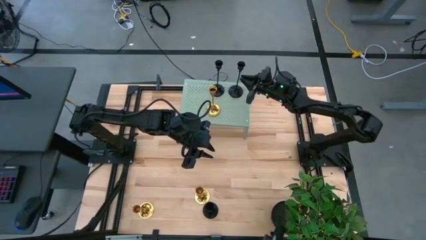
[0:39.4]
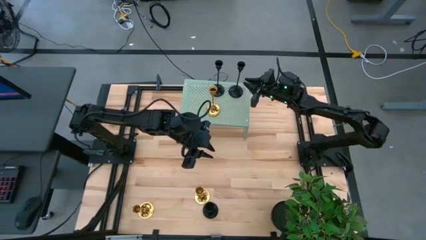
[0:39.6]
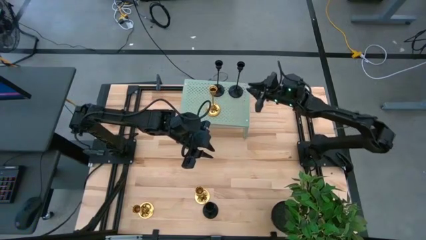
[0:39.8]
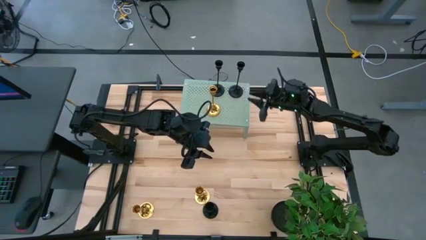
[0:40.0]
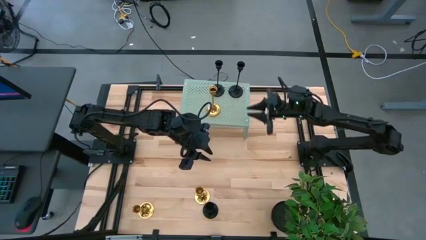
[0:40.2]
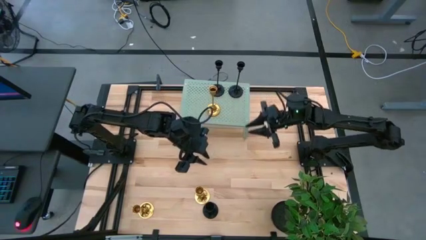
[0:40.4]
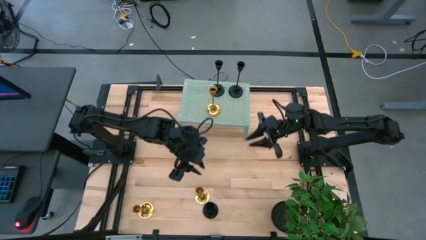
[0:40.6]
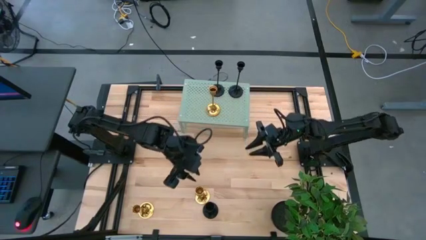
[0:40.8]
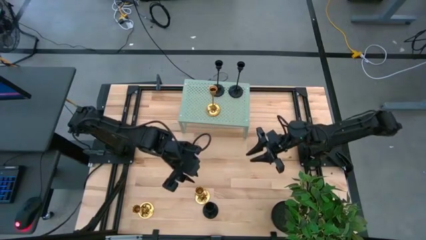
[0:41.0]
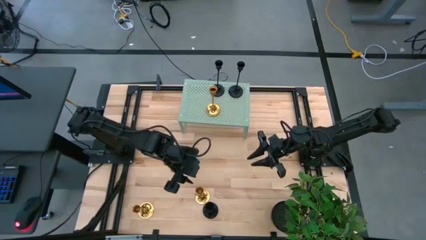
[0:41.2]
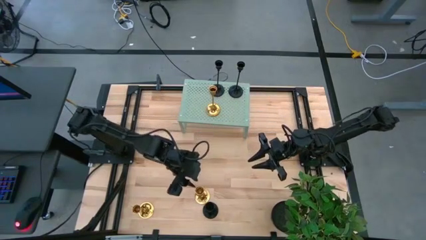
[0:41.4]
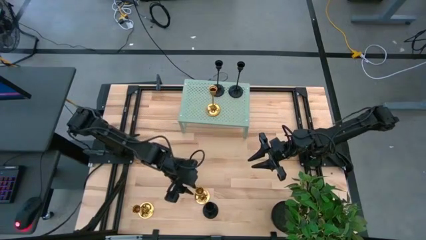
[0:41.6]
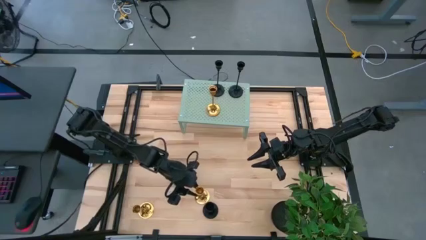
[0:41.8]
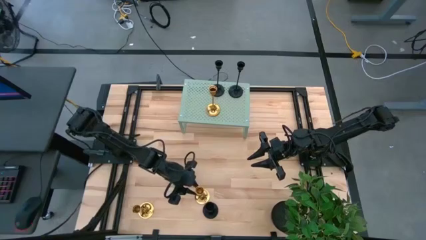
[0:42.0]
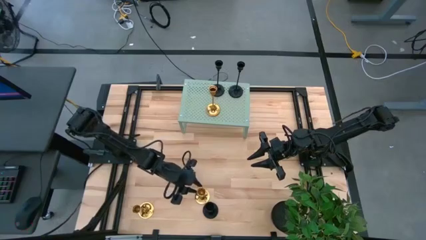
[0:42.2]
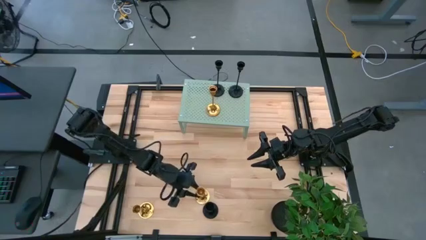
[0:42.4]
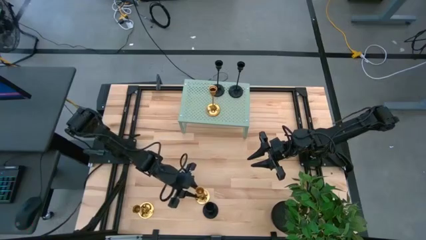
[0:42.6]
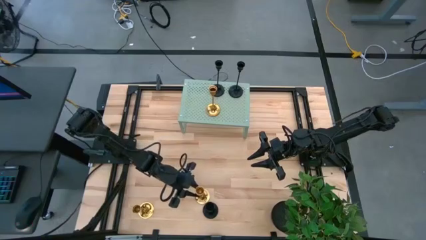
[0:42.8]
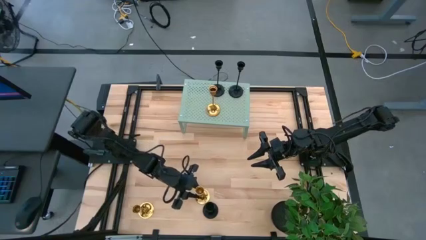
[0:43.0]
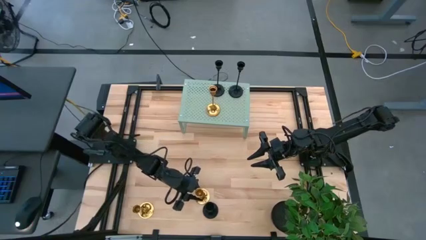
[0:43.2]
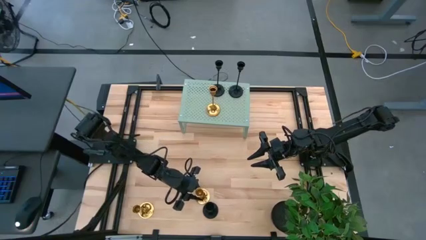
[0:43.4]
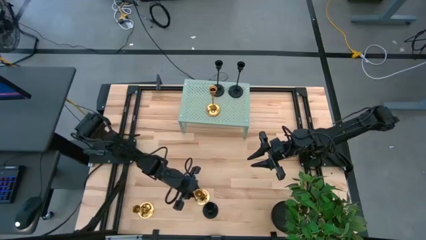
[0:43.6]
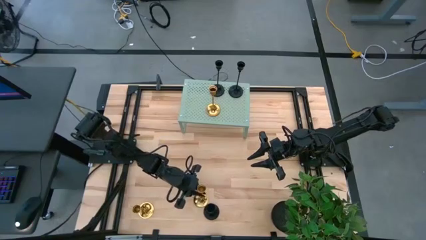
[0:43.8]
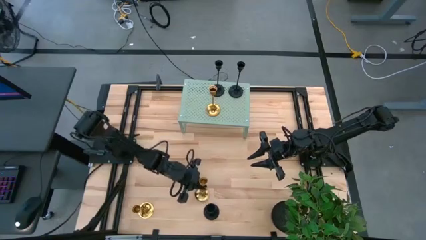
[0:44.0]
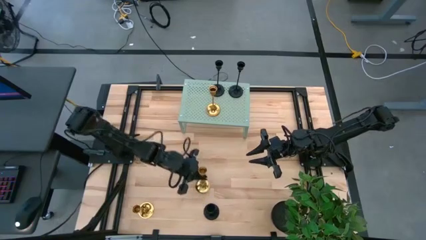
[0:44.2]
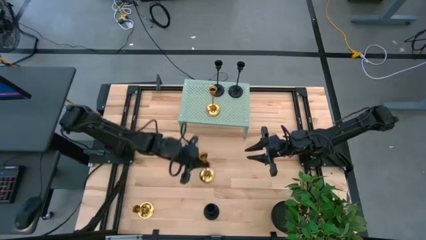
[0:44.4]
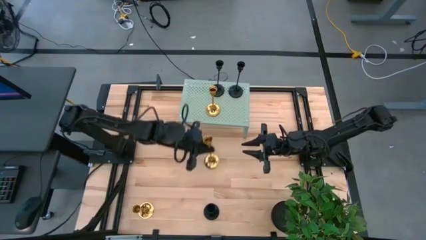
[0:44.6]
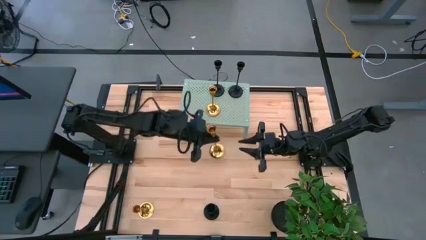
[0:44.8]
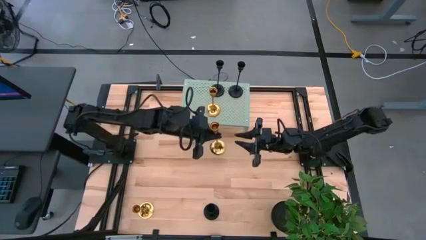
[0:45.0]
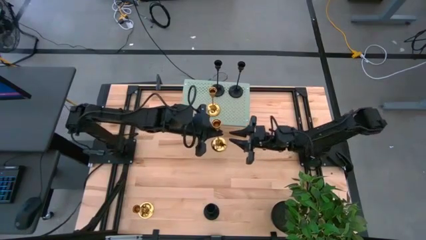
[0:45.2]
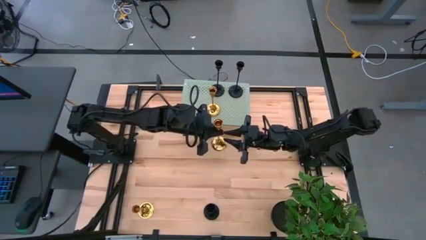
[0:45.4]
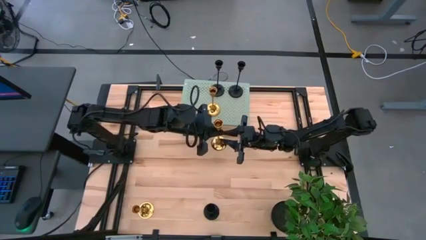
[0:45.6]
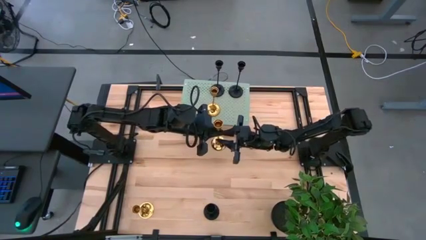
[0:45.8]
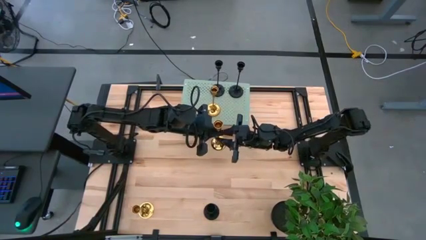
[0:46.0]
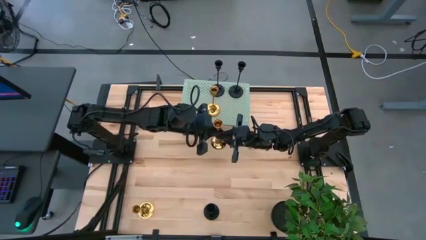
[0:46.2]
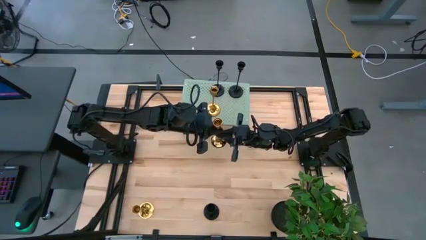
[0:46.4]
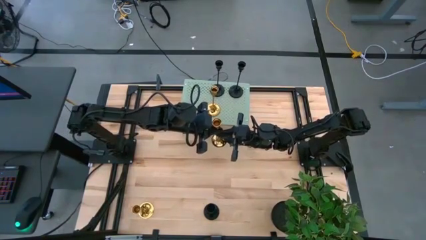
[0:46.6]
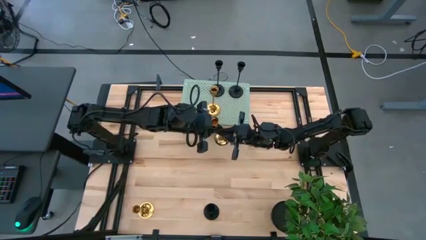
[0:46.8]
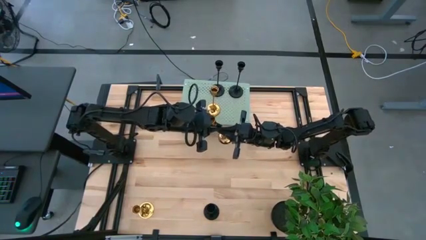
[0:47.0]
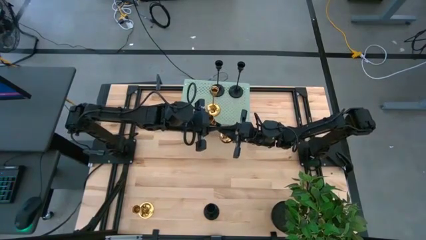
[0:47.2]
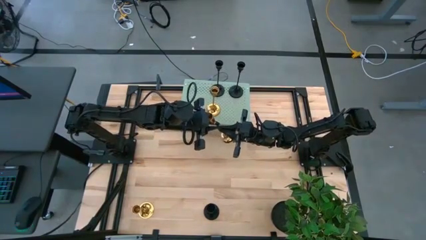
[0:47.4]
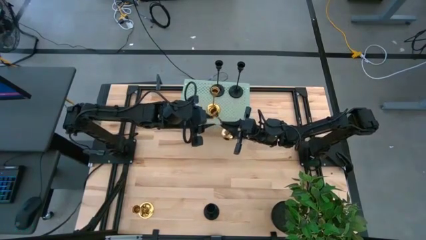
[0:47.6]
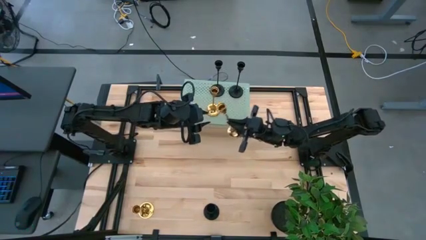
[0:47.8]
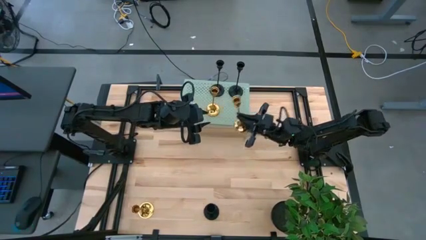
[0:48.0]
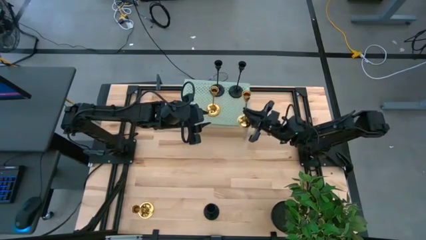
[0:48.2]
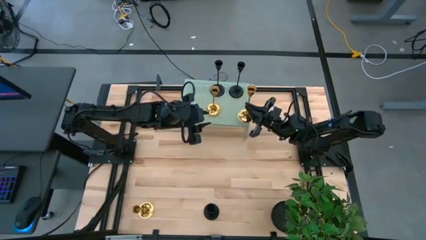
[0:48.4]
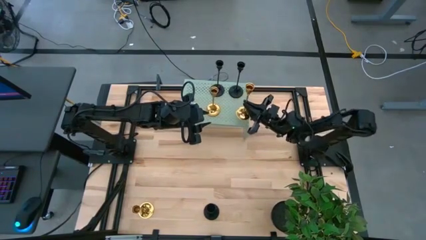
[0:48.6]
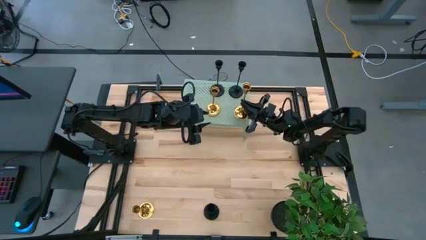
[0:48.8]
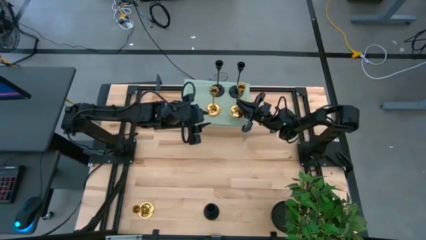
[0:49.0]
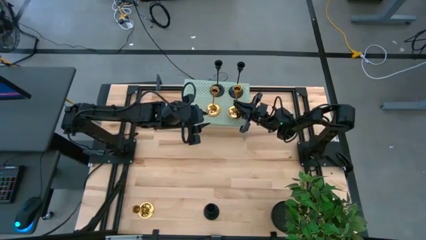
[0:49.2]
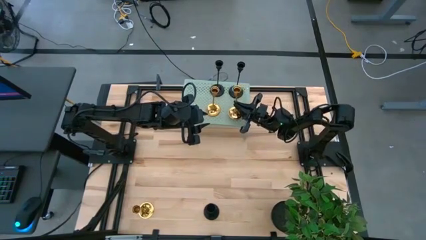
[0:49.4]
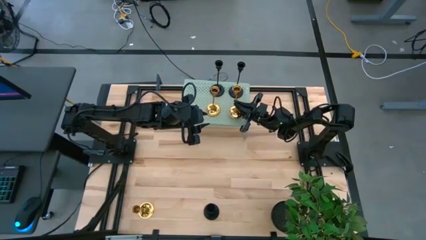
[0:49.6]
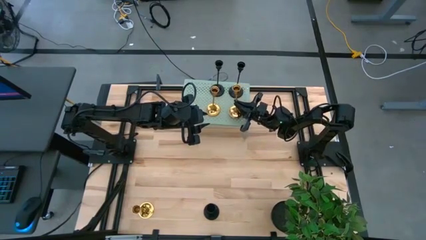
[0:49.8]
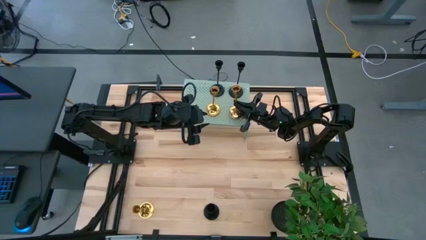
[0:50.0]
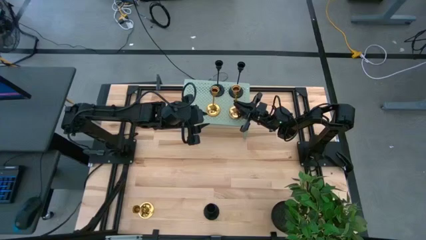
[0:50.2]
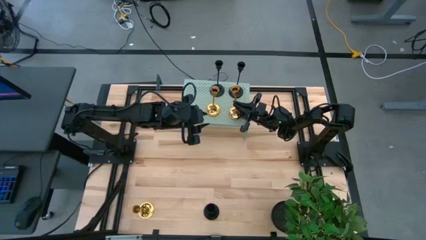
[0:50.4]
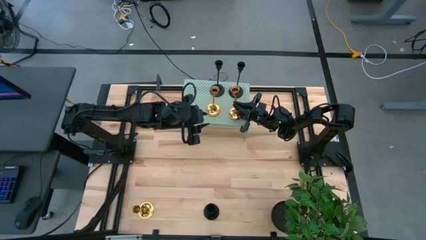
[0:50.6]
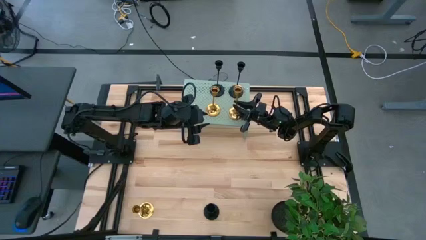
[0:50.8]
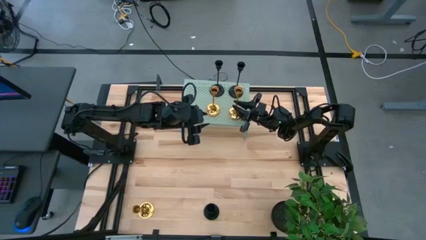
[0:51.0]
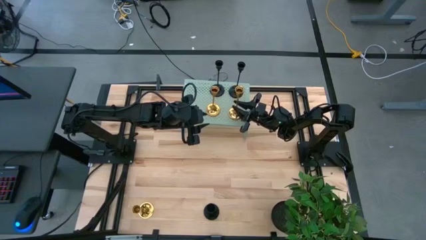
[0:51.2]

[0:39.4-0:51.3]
Task: Pick & Place candle stick holders
Put the right gold candle holder on the shelf aligned with the other gold candle holder

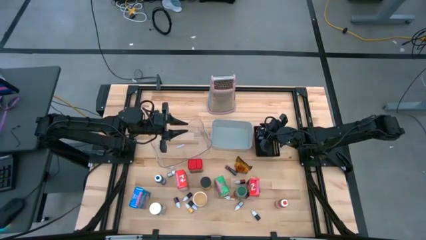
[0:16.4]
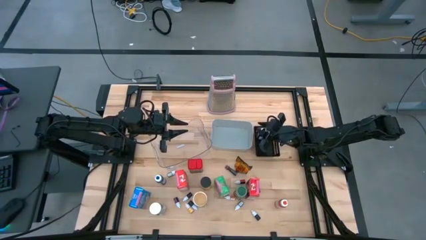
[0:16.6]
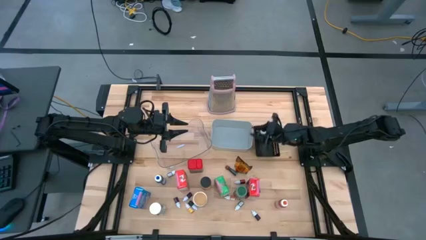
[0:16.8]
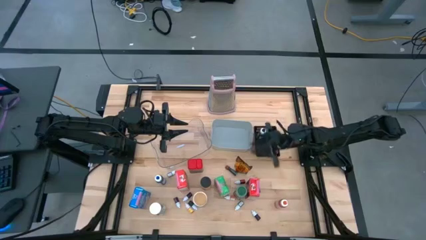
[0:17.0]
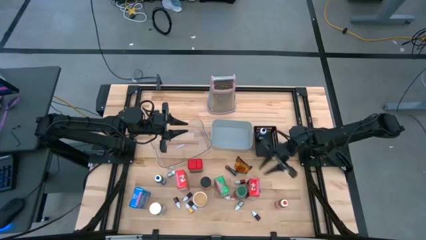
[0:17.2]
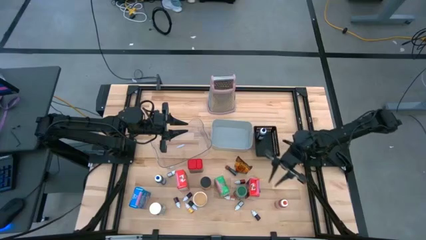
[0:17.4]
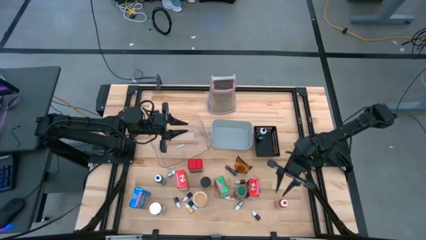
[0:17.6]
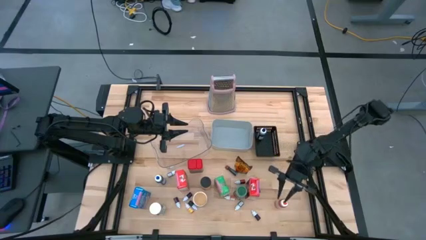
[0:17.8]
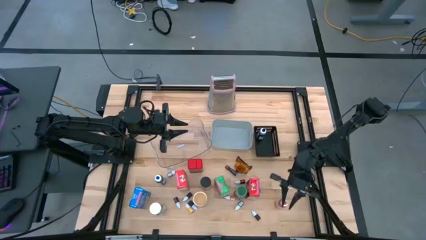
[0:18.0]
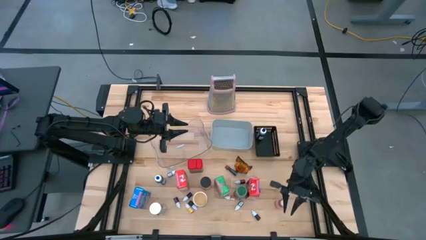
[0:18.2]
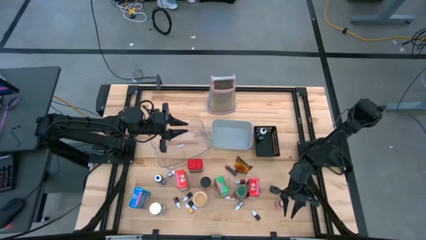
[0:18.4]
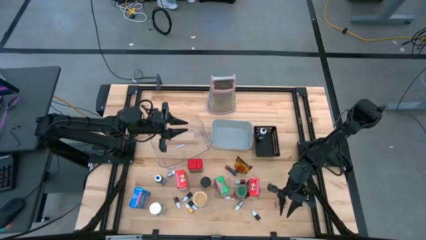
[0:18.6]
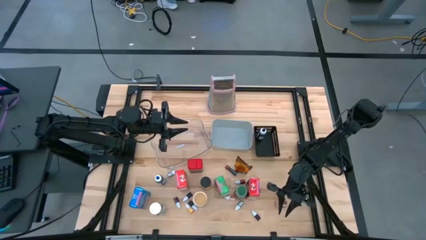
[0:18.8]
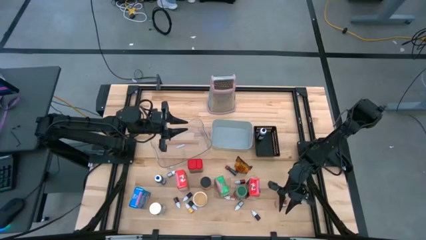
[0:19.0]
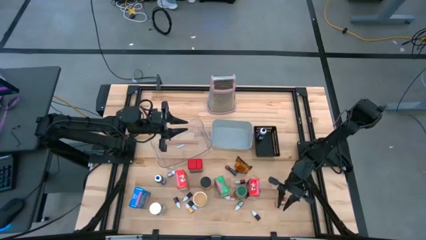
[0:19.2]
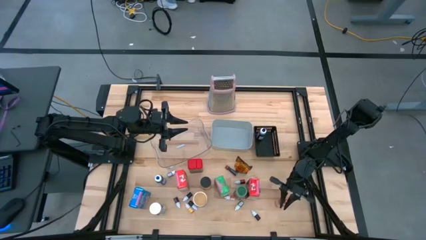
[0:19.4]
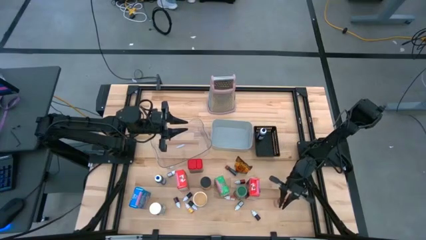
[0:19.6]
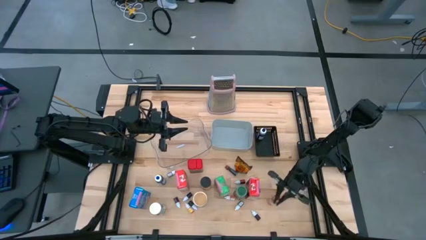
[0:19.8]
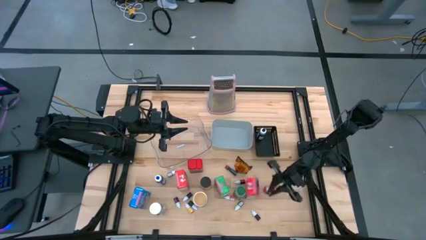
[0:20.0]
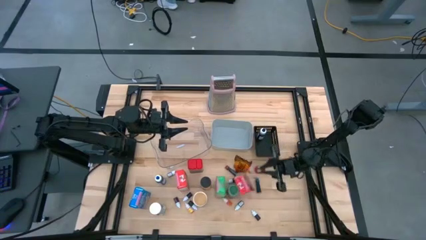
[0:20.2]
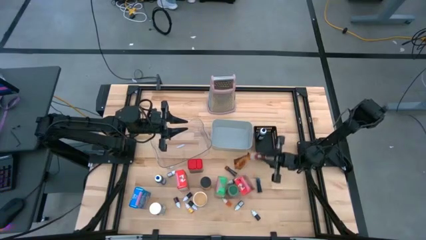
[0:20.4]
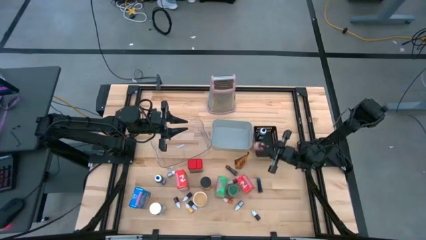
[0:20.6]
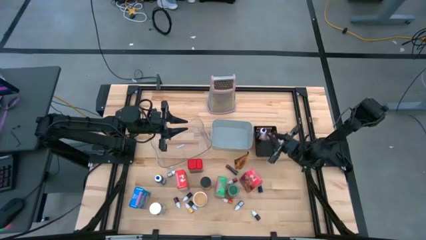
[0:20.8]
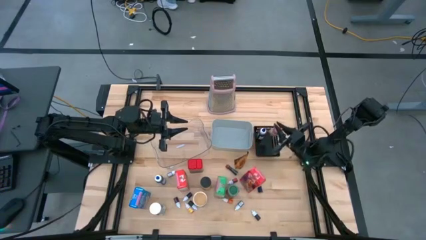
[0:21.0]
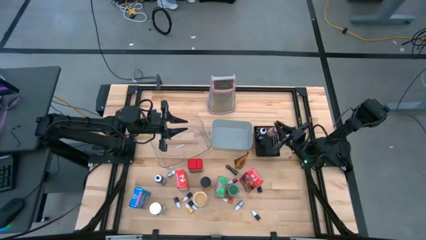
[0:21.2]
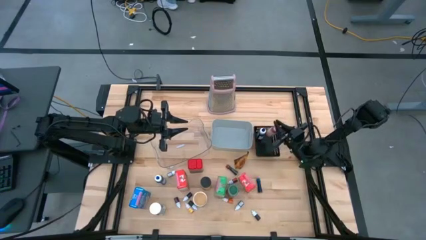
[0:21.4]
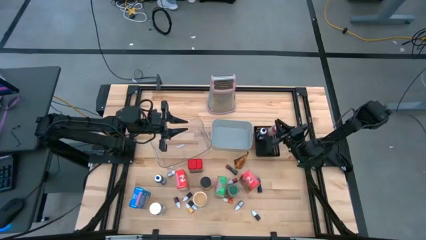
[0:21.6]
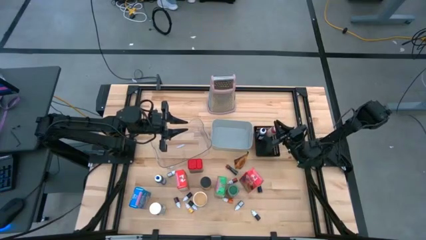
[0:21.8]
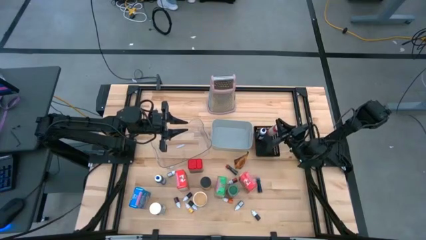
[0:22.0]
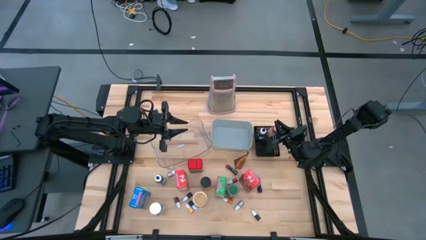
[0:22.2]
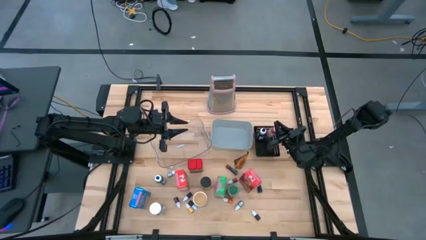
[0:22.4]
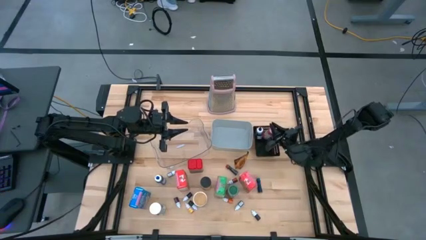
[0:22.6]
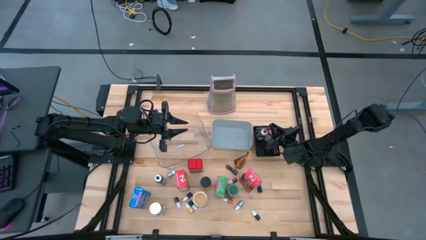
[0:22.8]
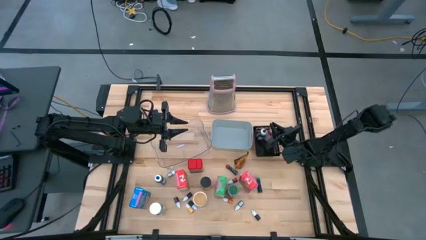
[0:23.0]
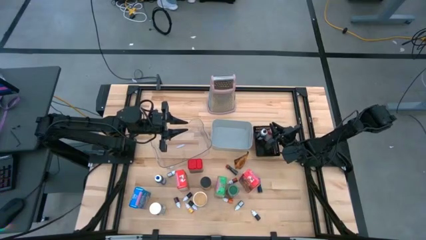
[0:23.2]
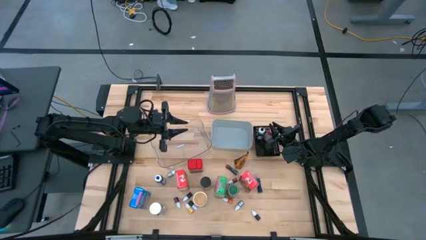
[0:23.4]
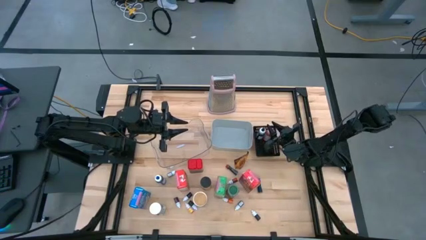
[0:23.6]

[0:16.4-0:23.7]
Task: Pick & Place Kitchen Items
Put the large orange food coloring bottle into the black basket
